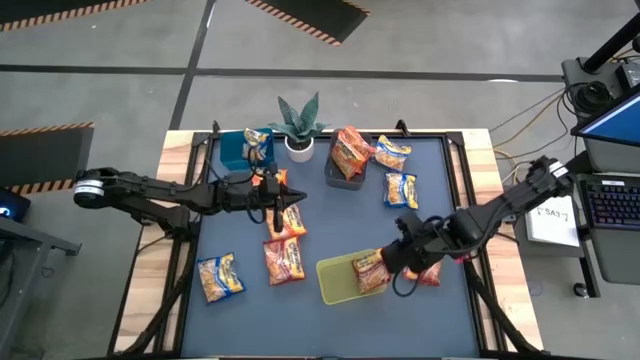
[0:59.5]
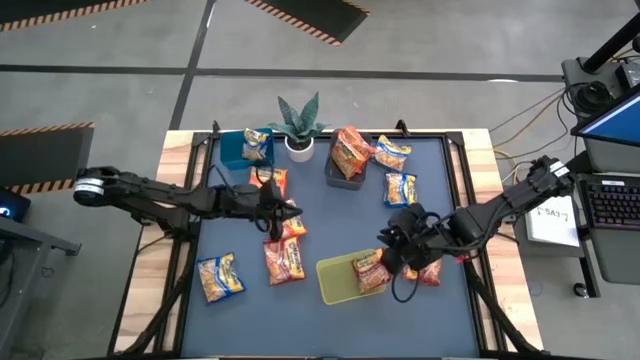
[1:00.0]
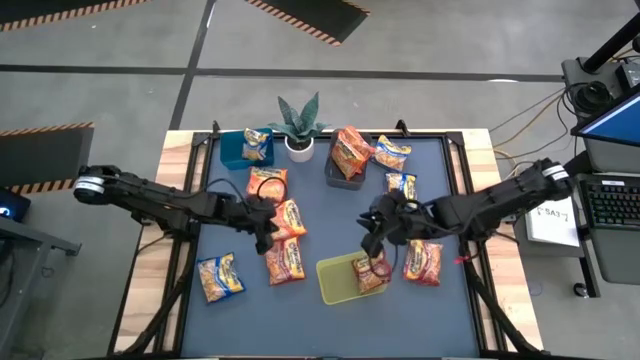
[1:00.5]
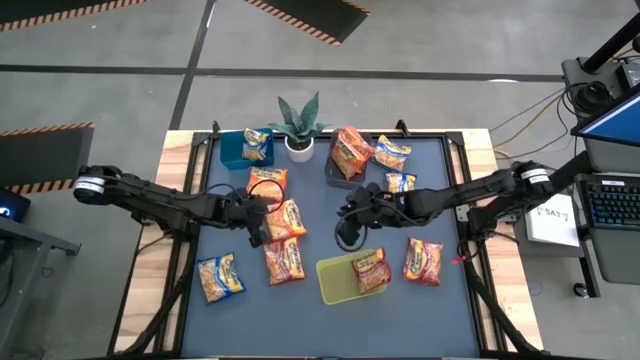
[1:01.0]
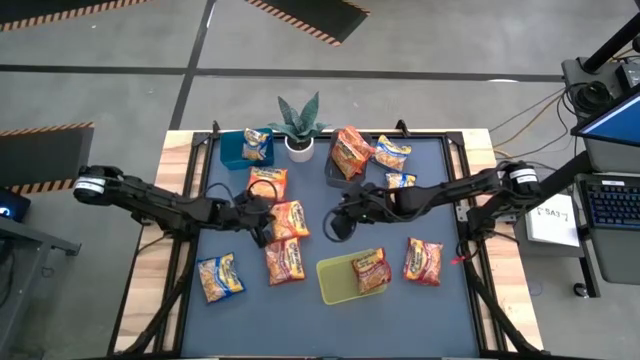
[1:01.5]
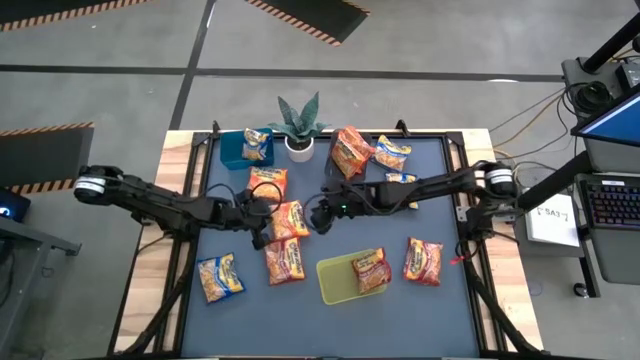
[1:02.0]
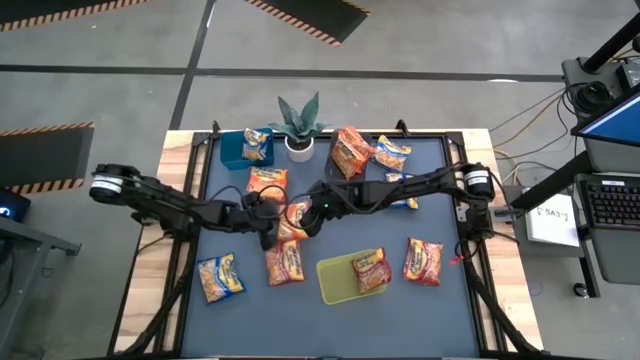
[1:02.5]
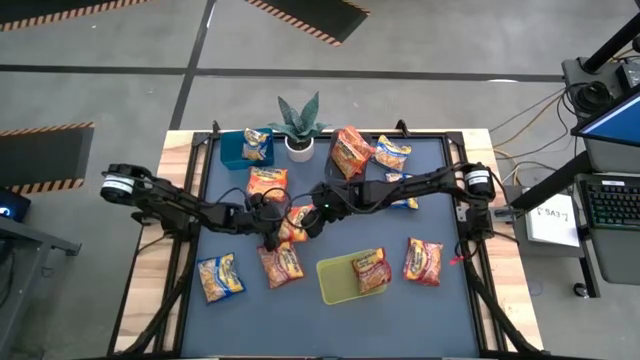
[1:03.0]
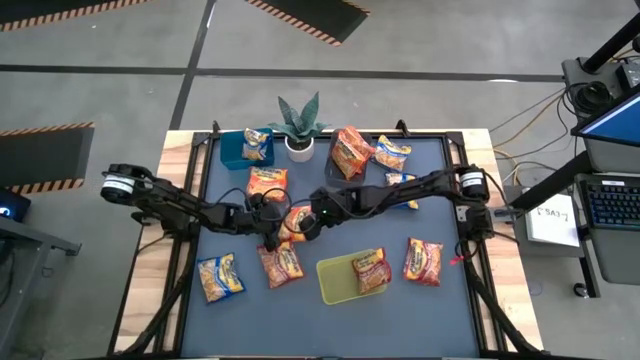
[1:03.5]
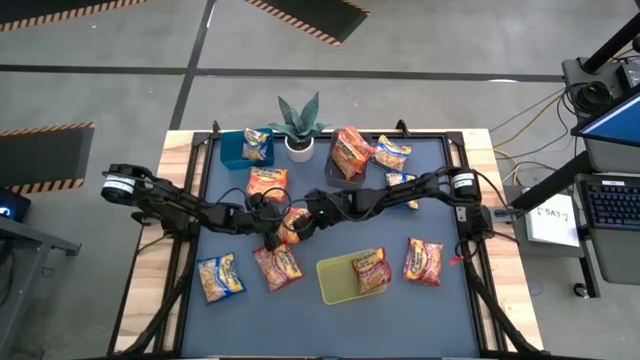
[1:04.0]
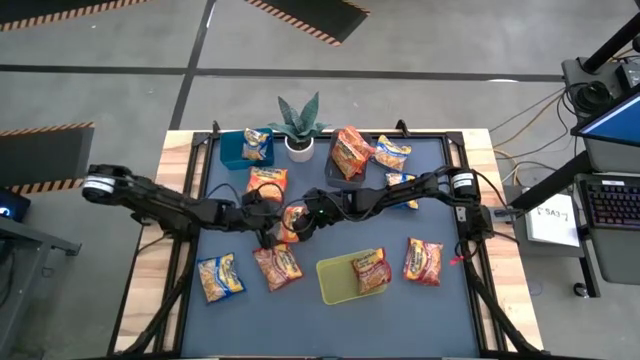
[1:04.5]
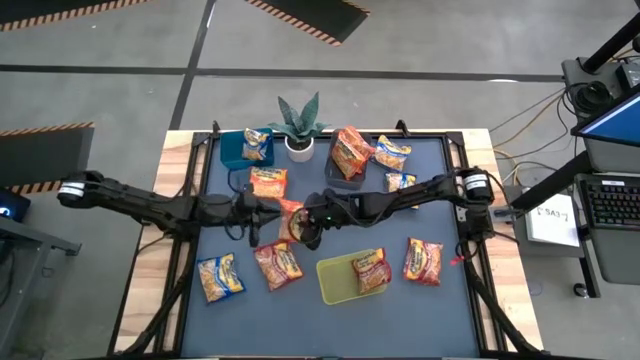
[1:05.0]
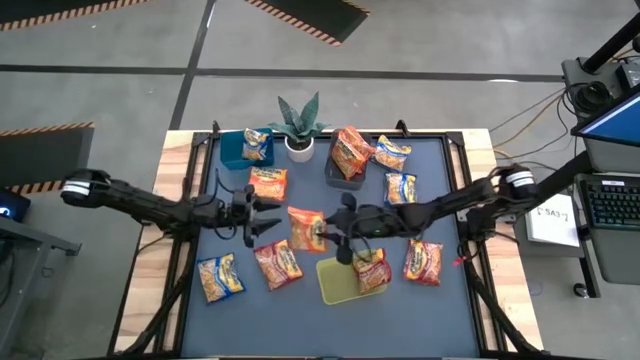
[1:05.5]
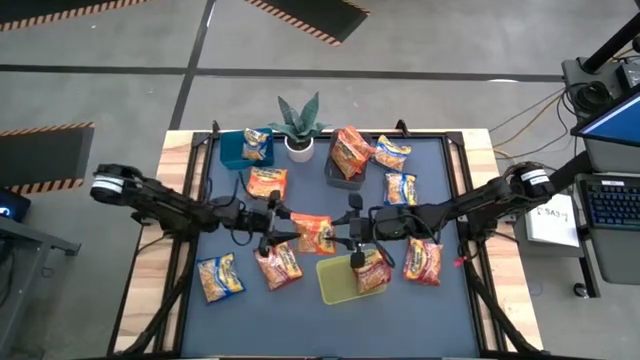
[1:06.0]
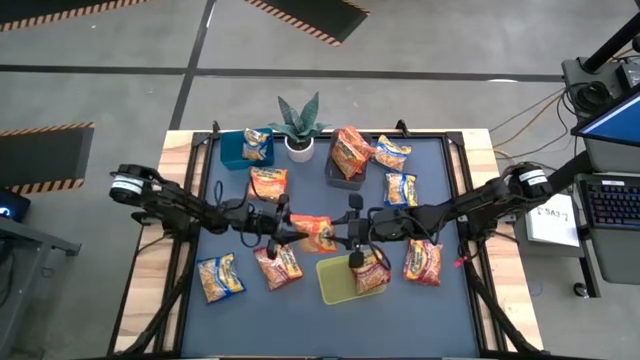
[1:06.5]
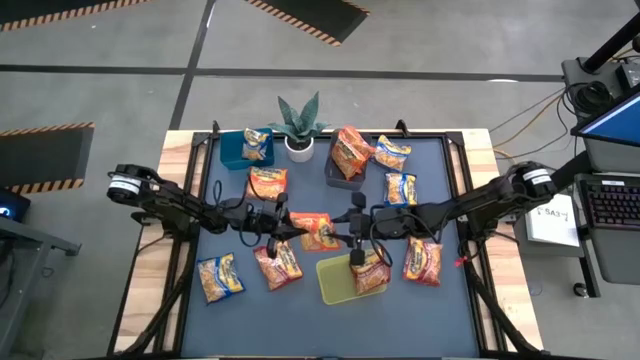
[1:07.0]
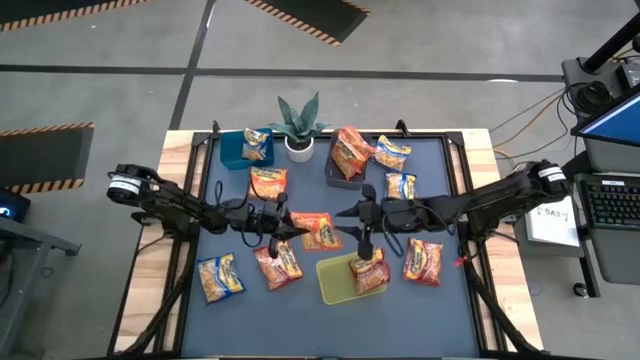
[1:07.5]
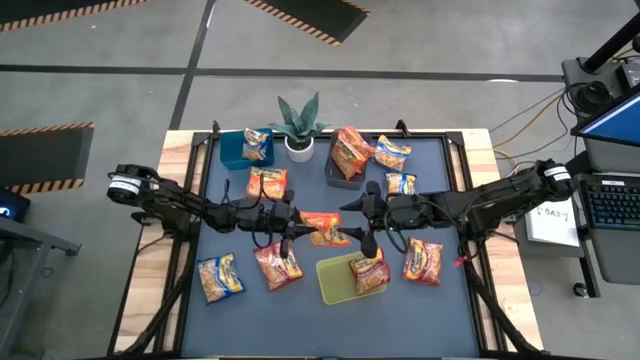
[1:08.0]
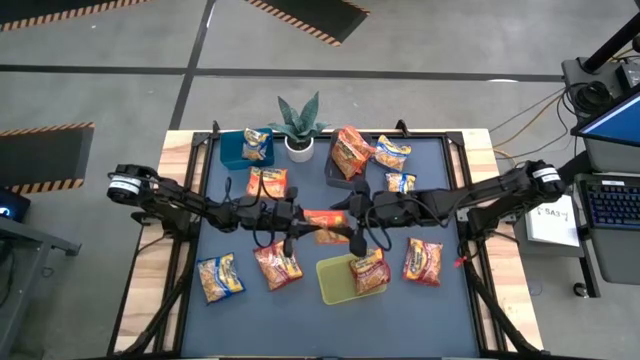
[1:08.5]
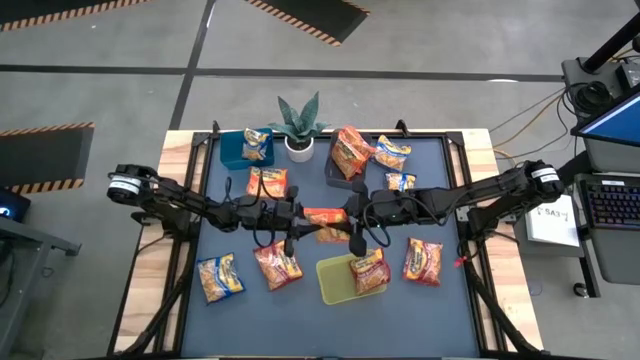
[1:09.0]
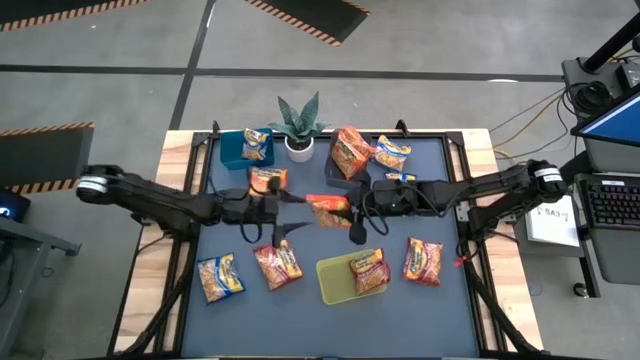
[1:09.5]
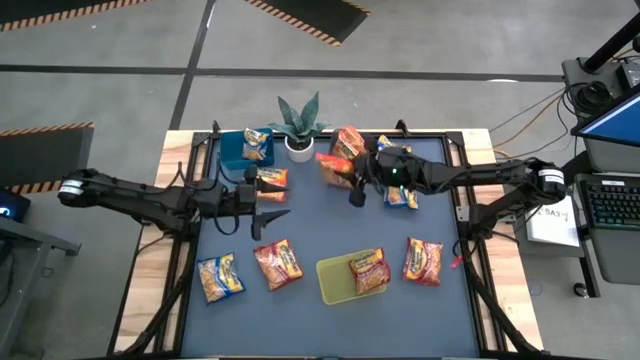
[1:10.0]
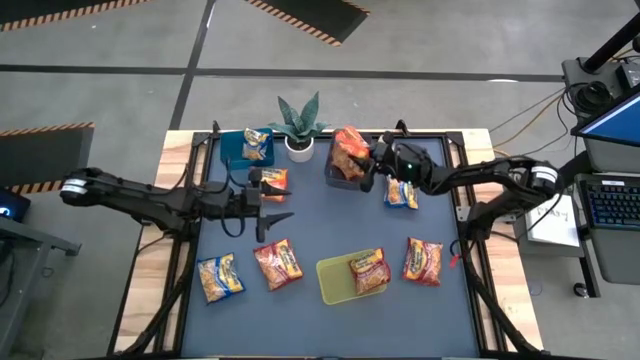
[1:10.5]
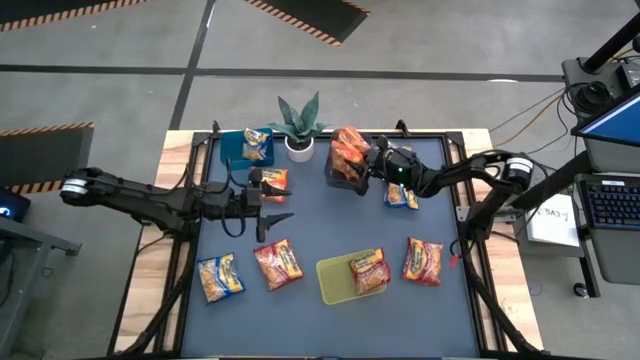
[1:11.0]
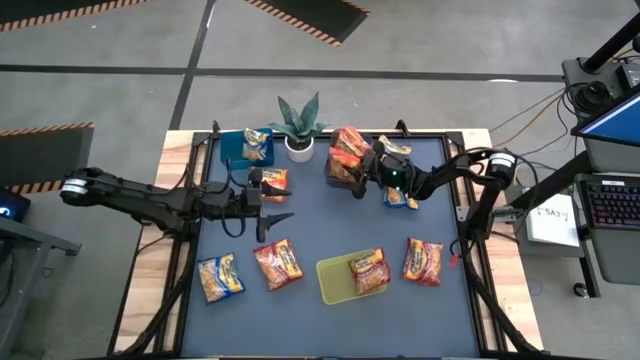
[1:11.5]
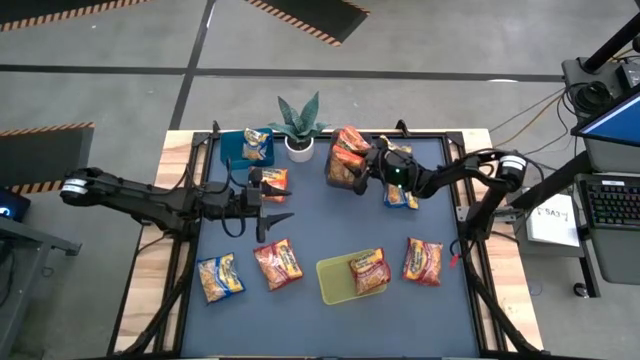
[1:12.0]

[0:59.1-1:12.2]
Task: Sort Maruchan noodles
Put the orange bag into the black bin

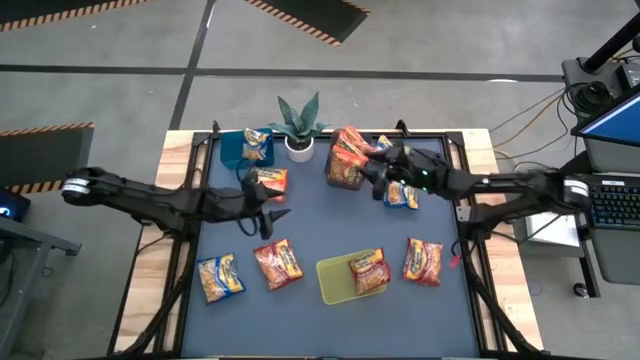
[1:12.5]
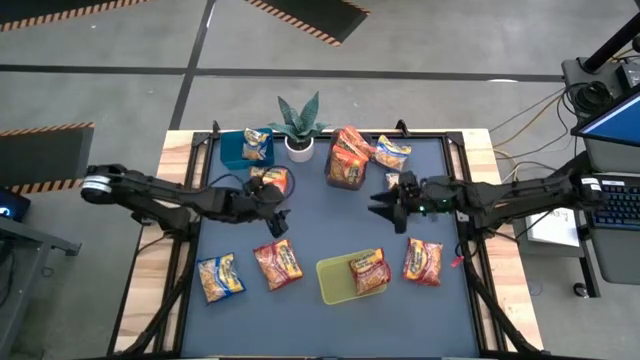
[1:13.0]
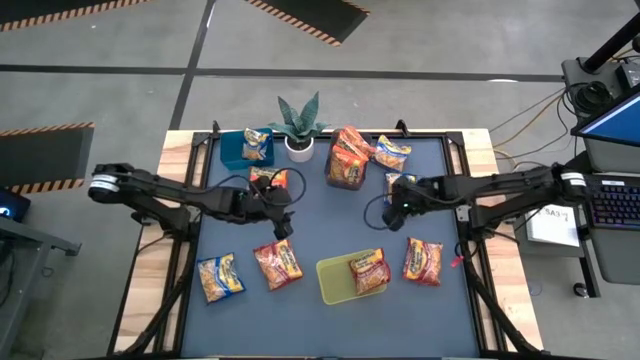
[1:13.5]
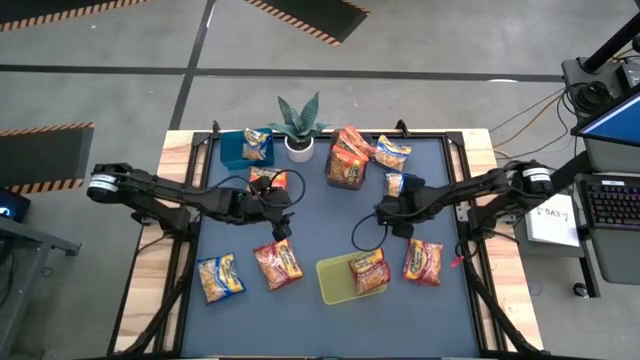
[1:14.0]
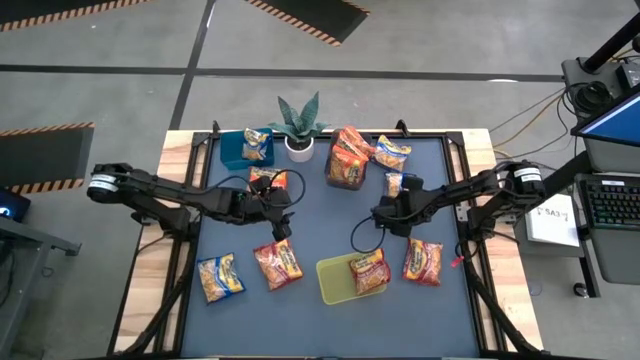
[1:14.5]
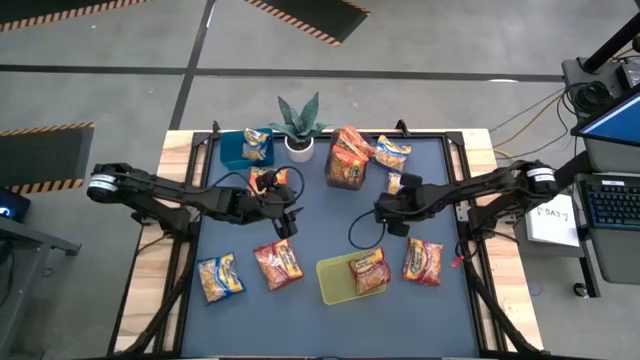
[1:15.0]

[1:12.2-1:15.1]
Put the blue bag into the blue bin

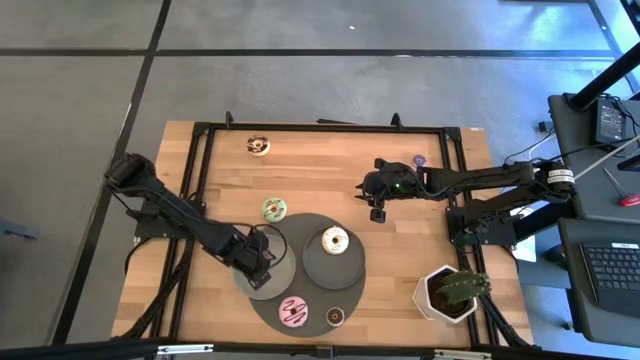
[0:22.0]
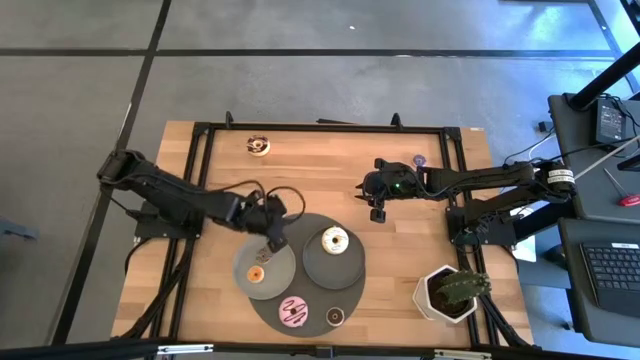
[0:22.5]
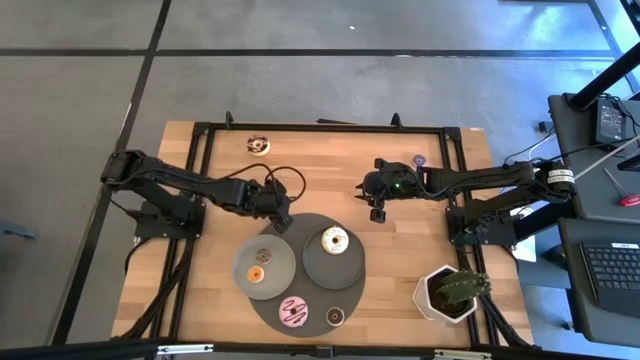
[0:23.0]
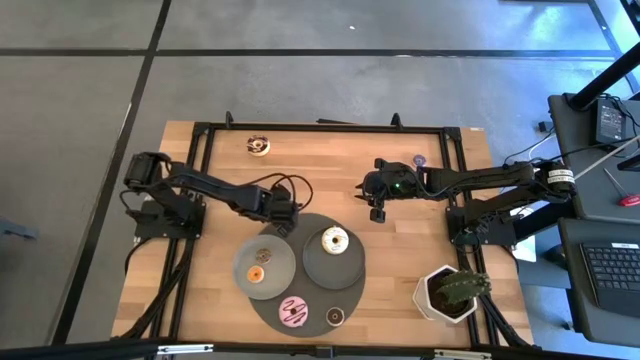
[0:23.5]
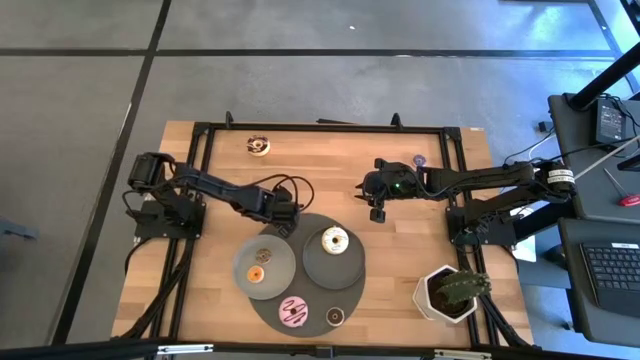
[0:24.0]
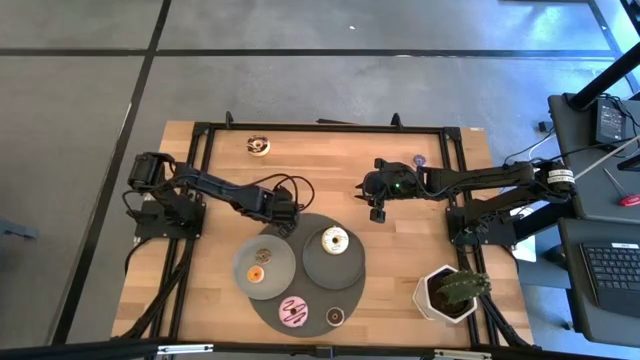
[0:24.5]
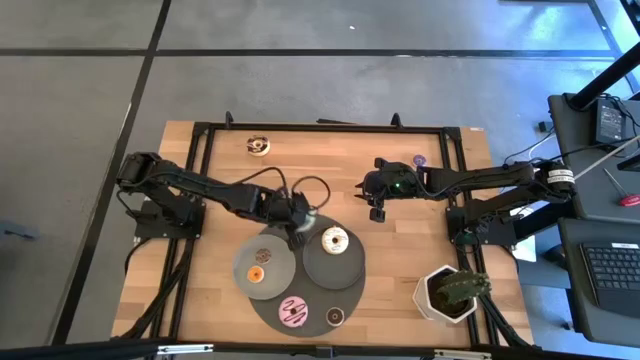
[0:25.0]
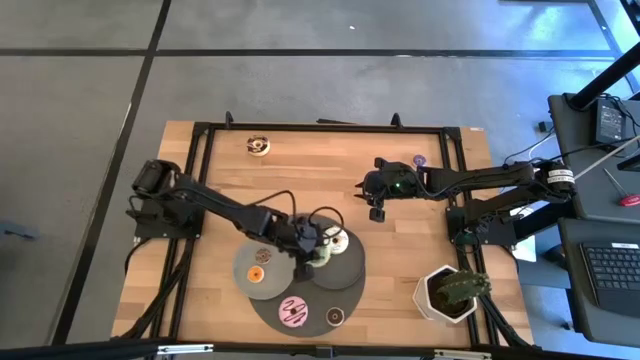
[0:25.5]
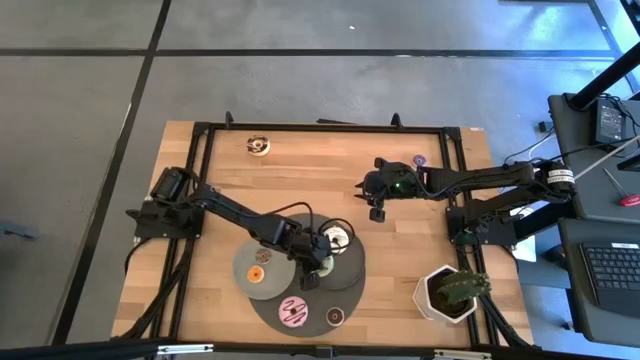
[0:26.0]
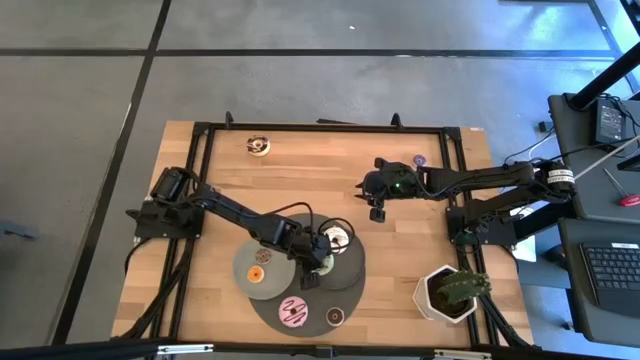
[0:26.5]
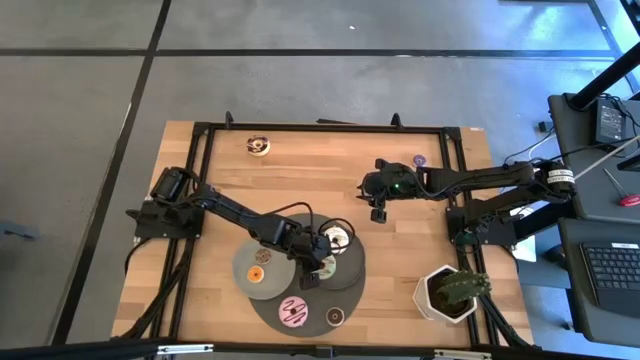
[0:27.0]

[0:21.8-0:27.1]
Task: Pick & Place donuts
Put the big blue donut on the black plate
